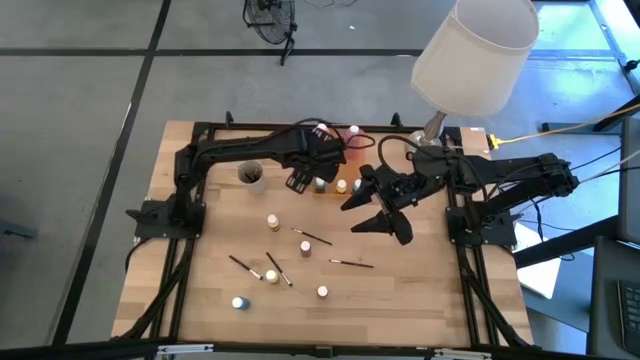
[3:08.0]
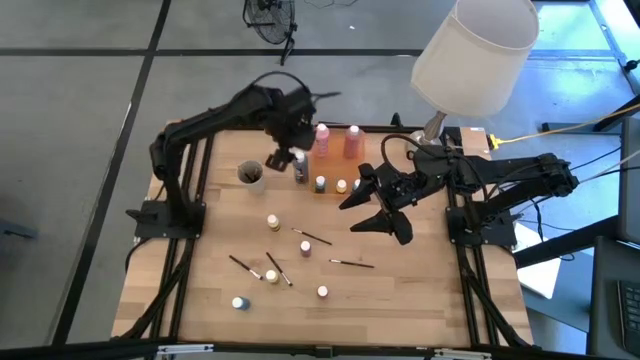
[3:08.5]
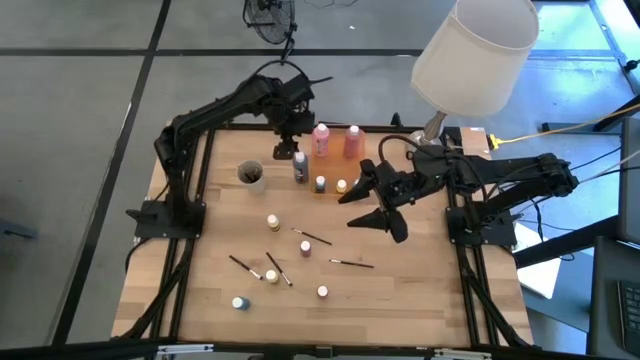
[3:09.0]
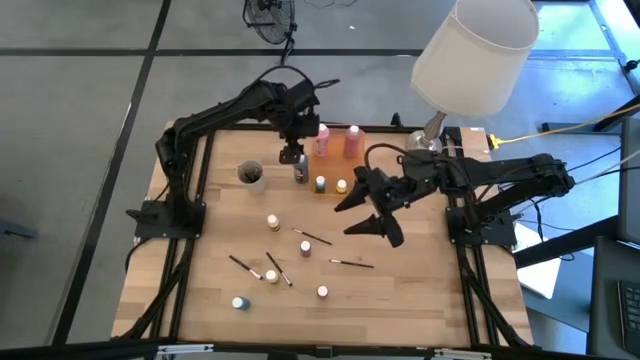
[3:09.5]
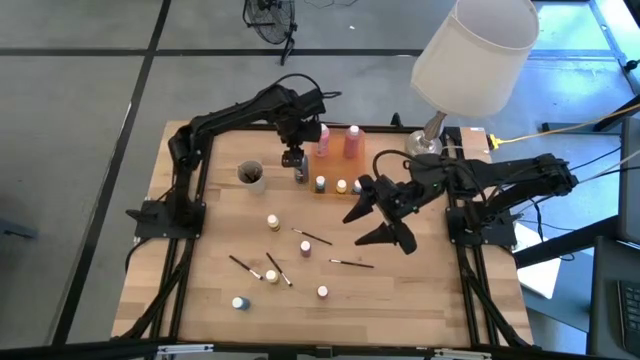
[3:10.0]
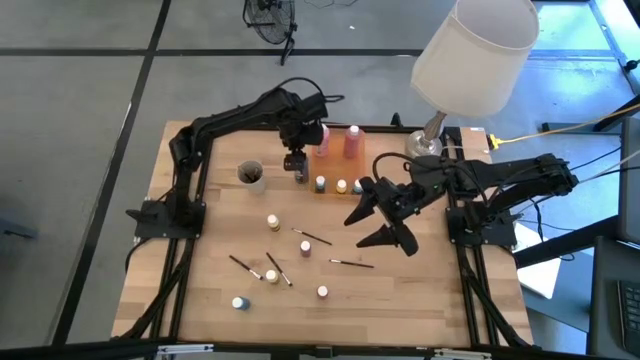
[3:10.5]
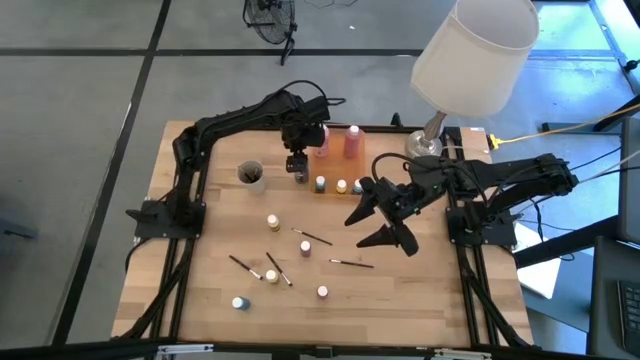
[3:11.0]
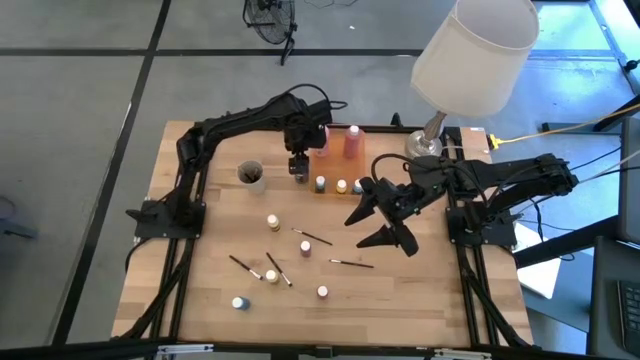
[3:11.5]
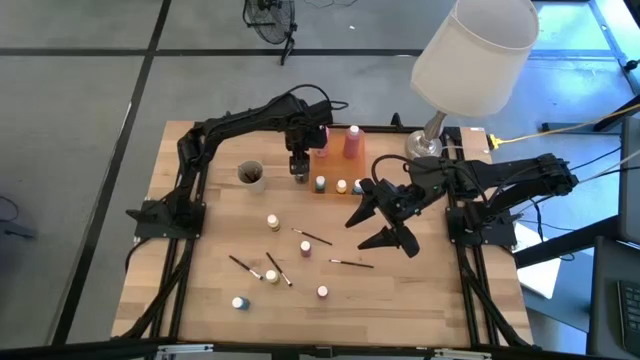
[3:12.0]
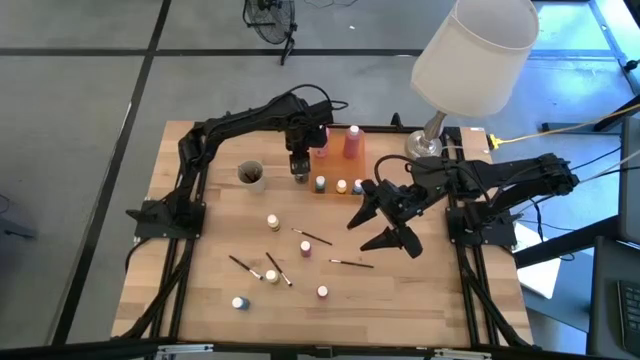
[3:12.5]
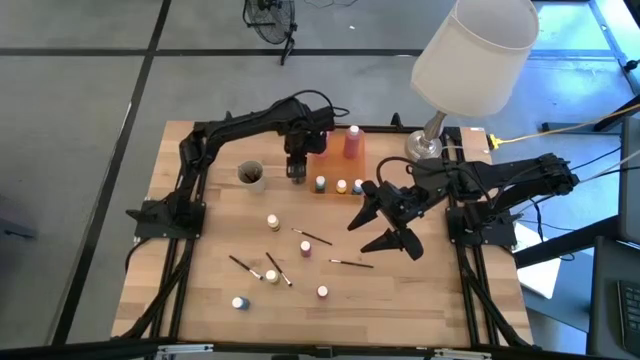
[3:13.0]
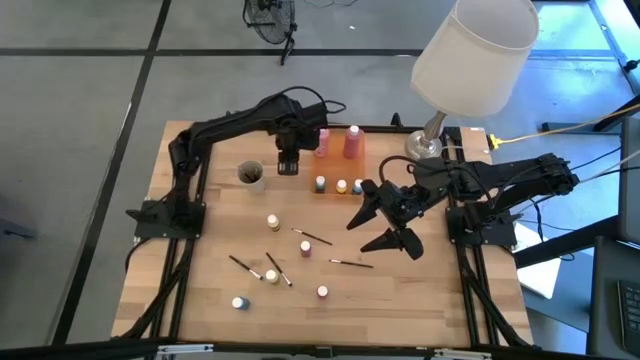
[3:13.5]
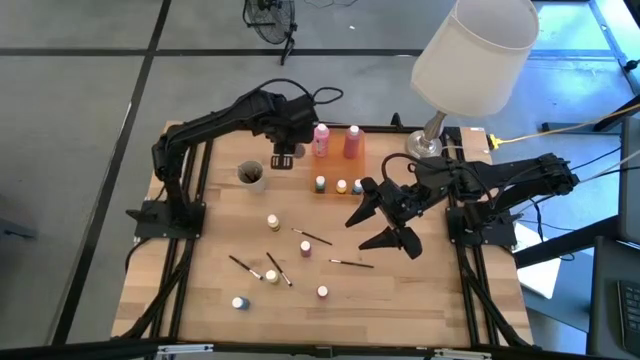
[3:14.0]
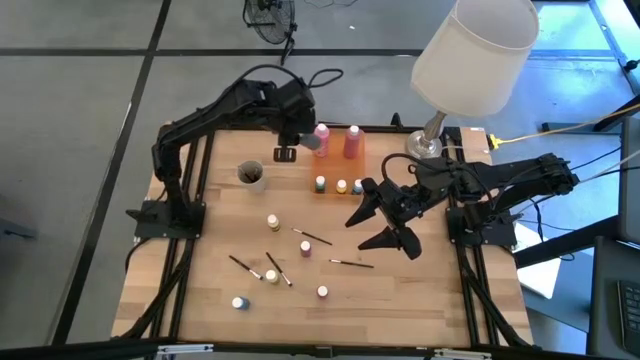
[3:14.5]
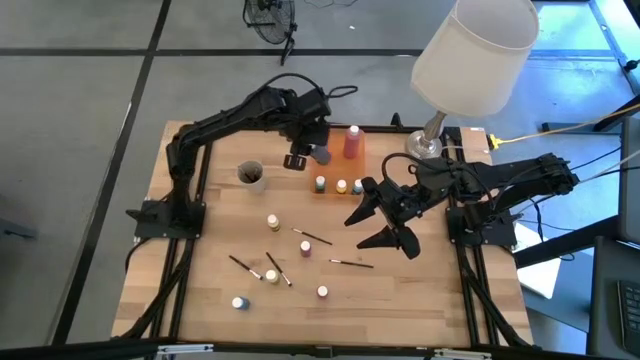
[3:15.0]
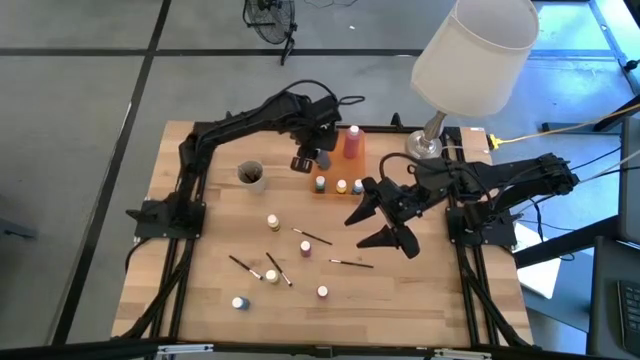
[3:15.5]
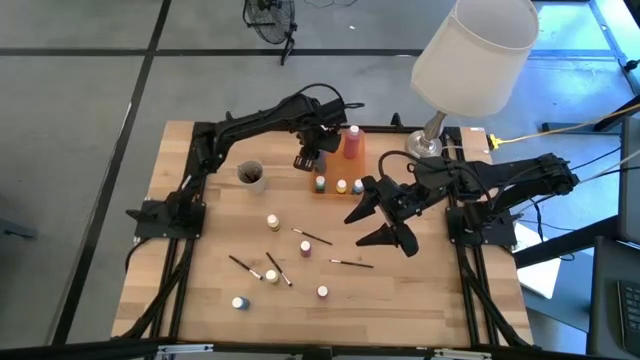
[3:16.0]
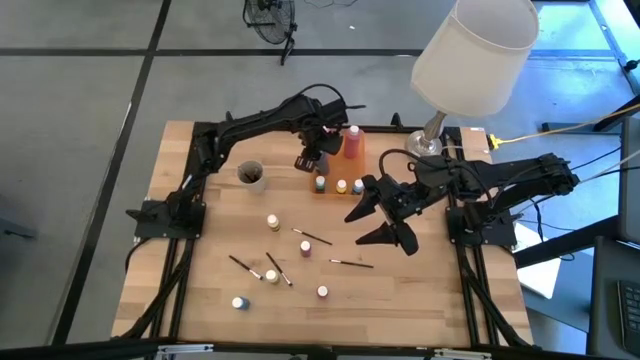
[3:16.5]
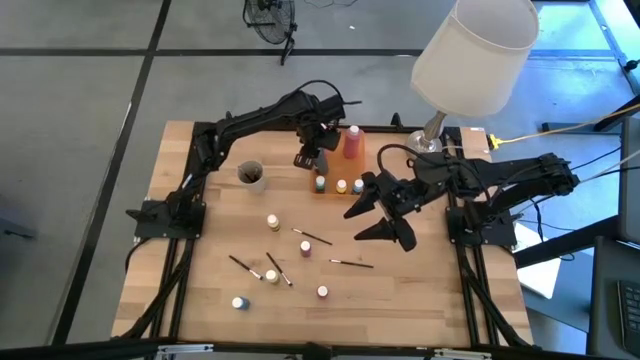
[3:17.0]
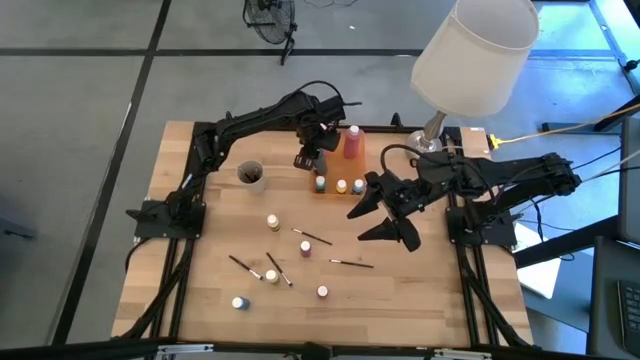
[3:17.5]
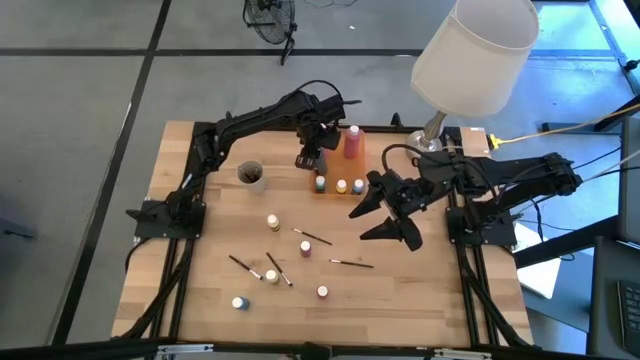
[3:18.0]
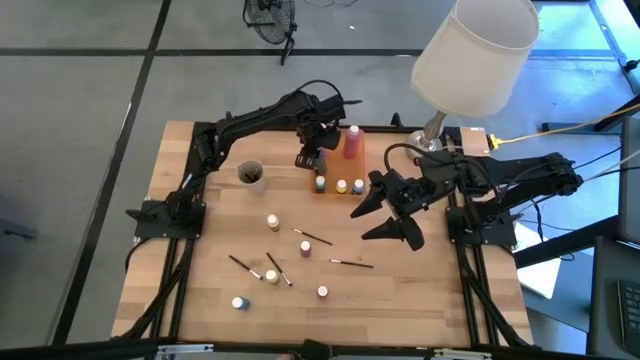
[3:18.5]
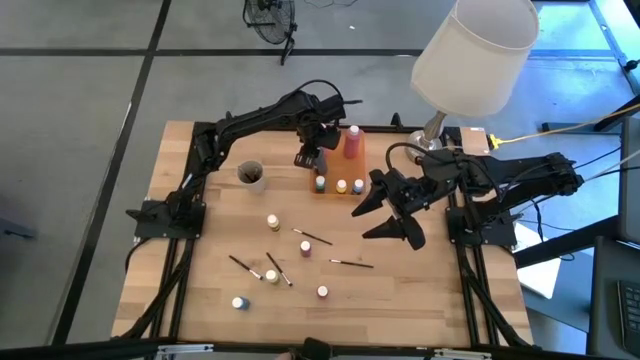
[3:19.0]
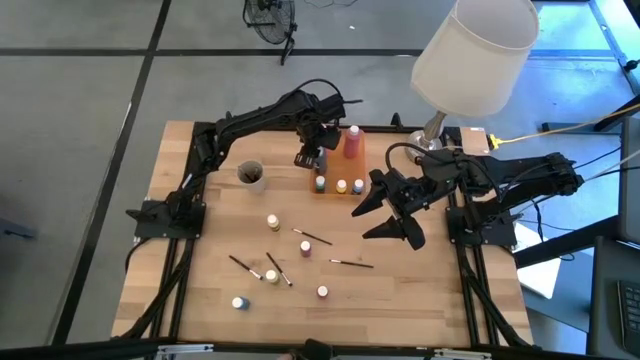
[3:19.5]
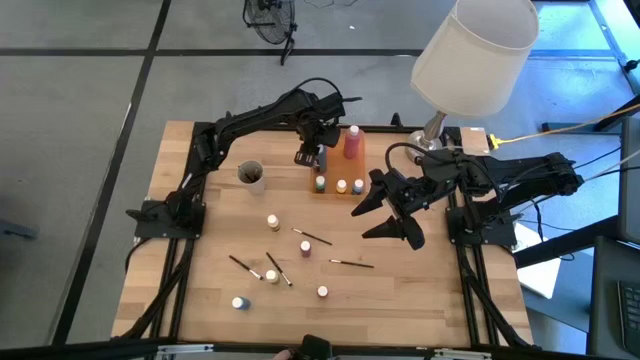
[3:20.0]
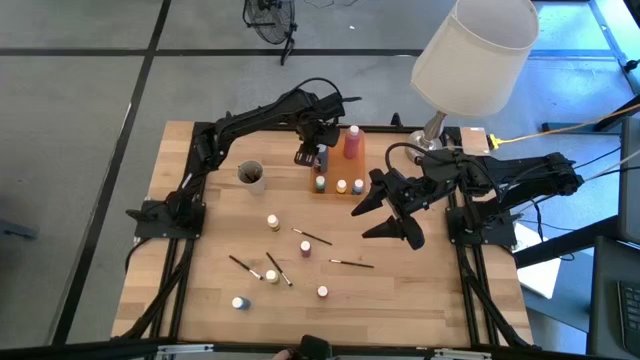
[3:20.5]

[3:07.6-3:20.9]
Task: Pick & Place Paint Supplies
Put the large black paint bottle into the orange bin

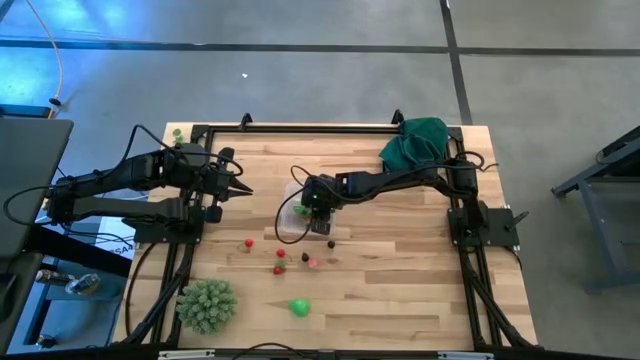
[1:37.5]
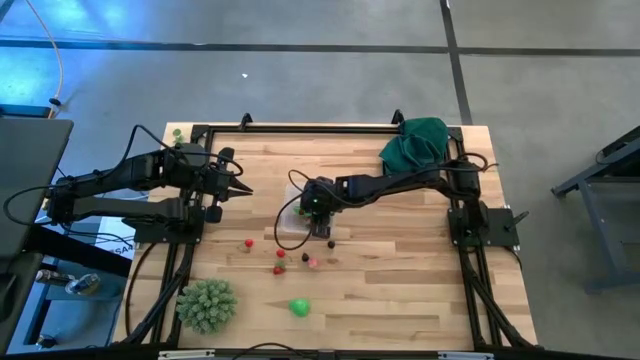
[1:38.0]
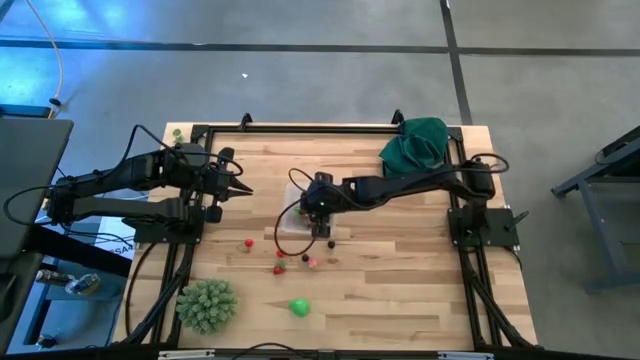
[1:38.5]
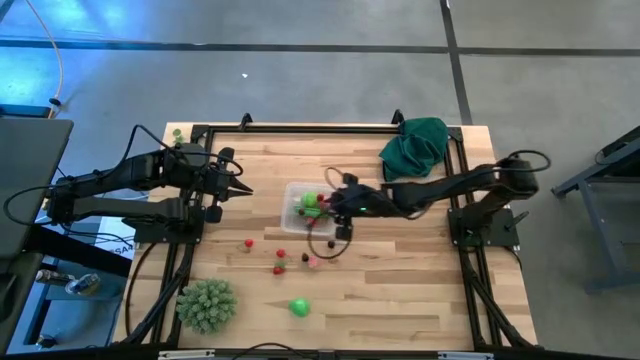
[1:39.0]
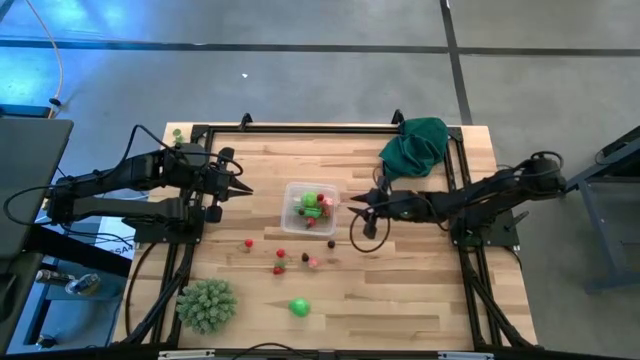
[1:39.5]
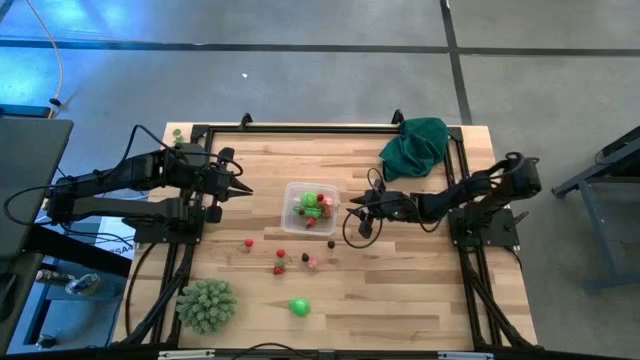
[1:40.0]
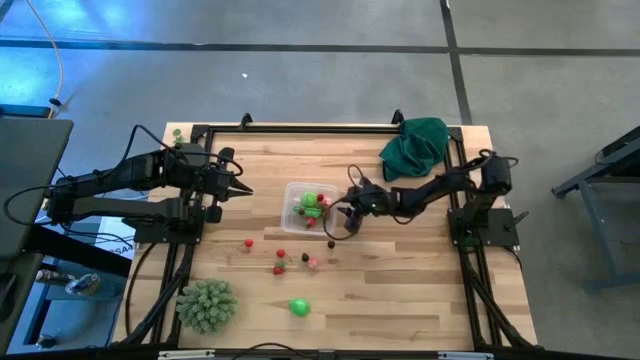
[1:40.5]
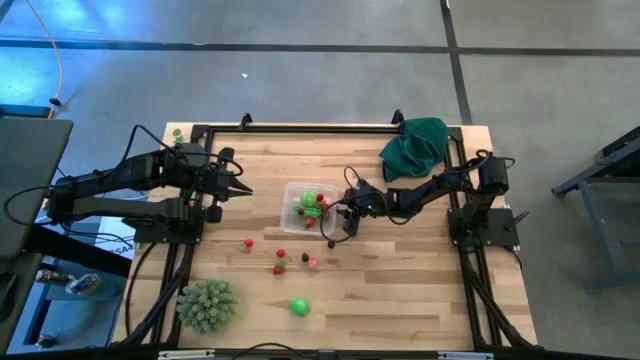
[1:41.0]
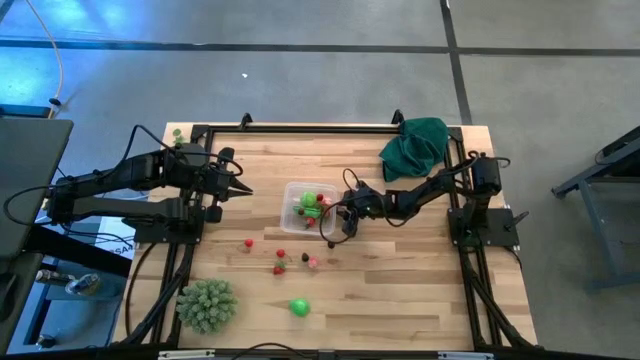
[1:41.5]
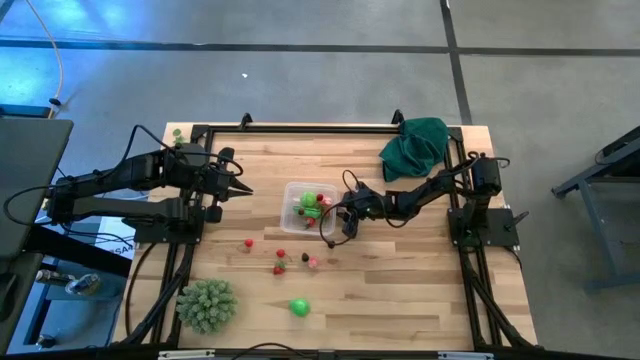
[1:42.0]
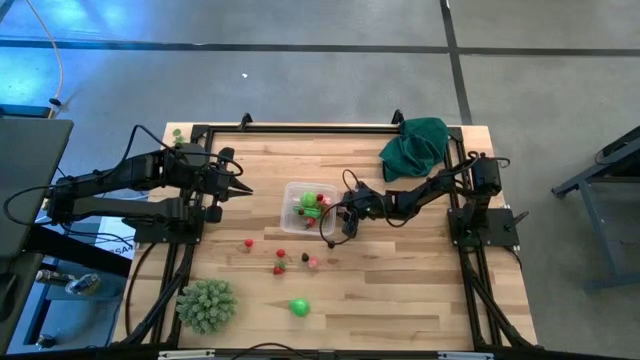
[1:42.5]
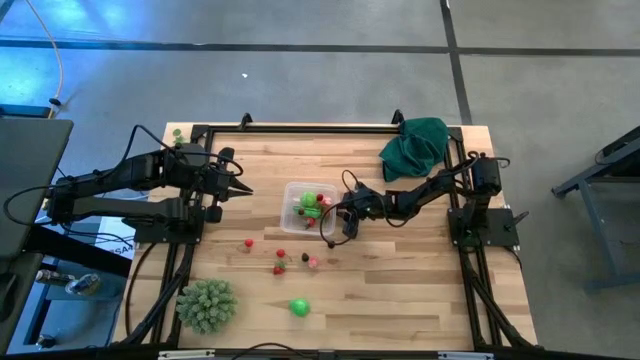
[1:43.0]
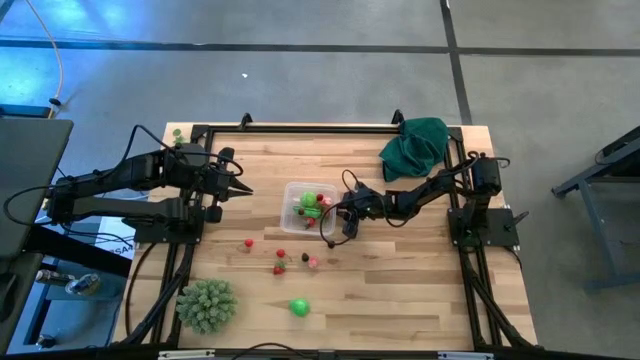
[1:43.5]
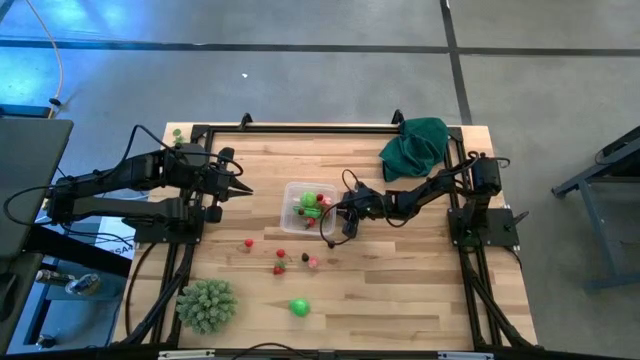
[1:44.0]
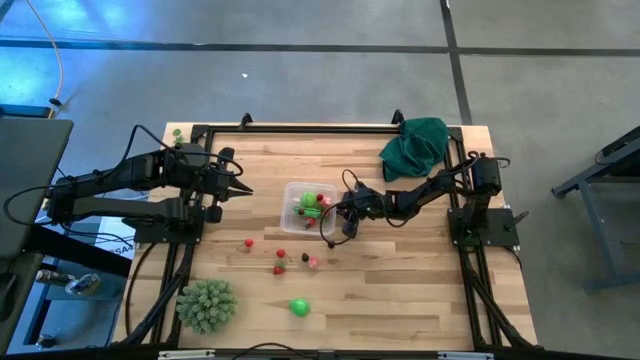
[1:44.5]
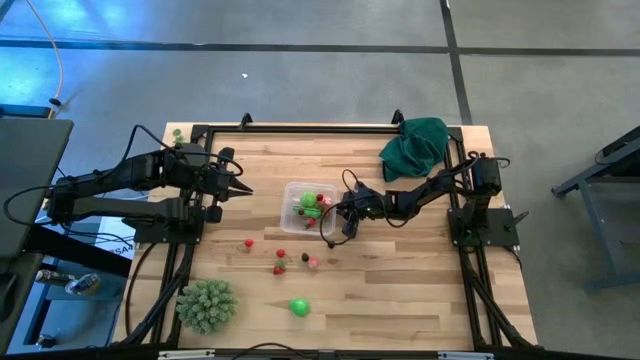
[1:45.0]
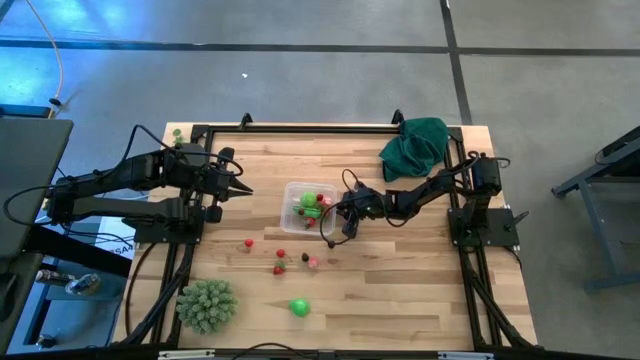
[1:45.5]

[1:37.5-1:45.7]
Task: Pick and placing Produce into tupperware
Put the blueberry into the transparent container

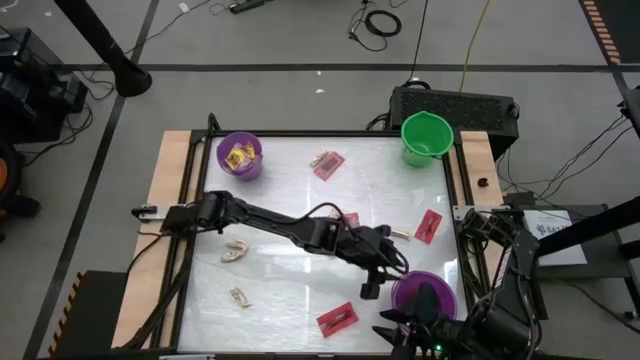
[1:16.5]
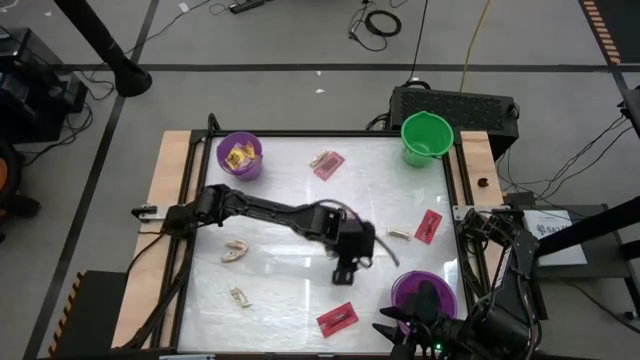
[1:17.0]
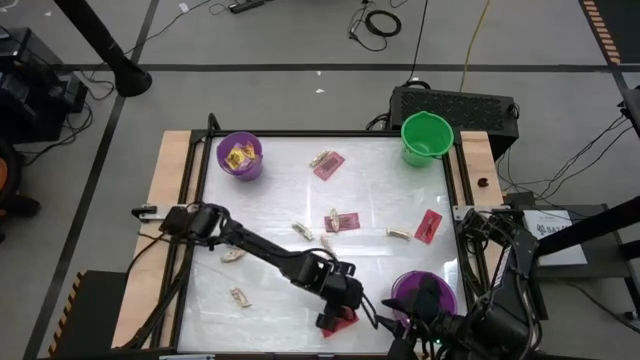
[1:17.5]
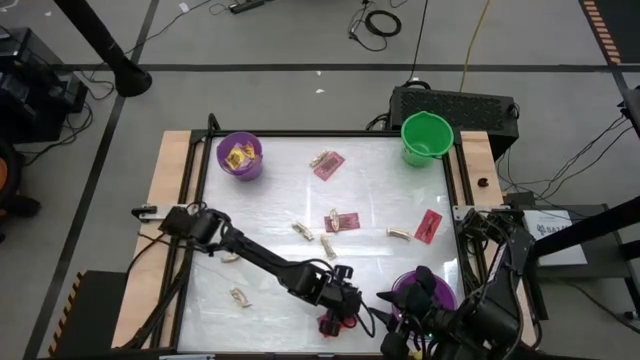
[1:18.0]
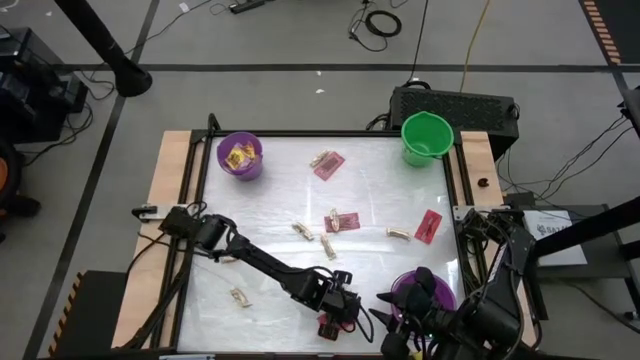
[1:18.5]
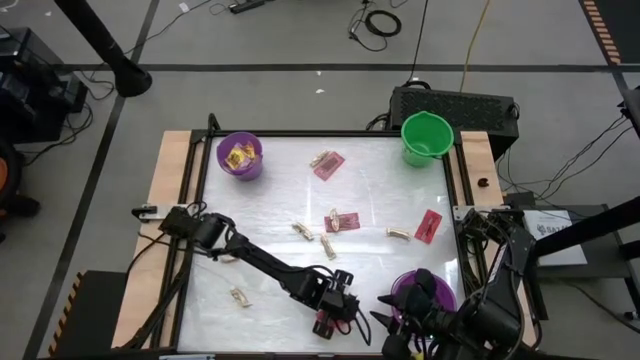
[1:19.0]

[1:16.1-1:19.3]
Task: Sort candy by brand, put in halloween buckets
Put the red candy into the bottom violet bucket
